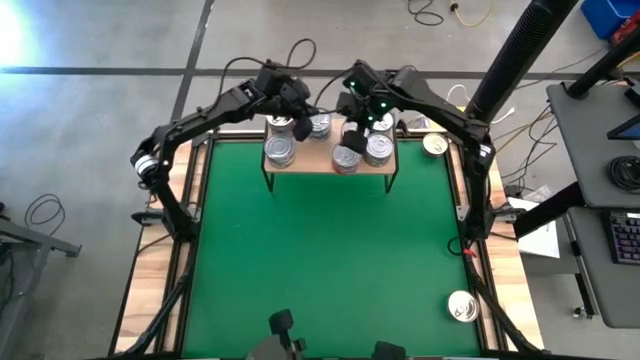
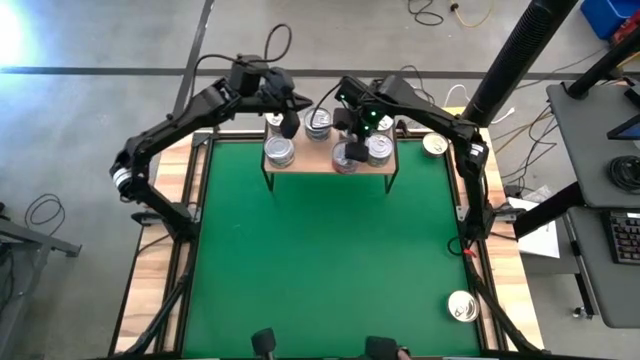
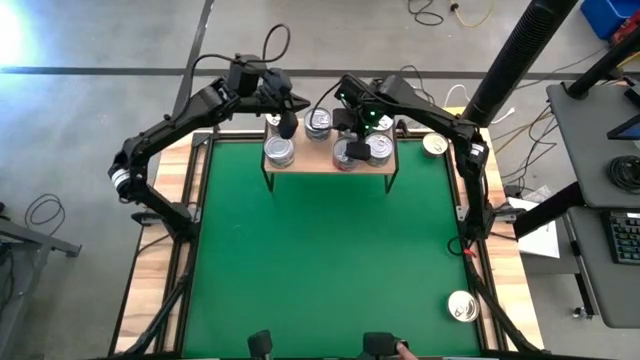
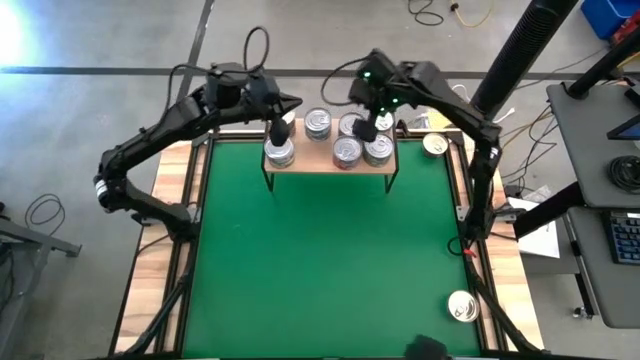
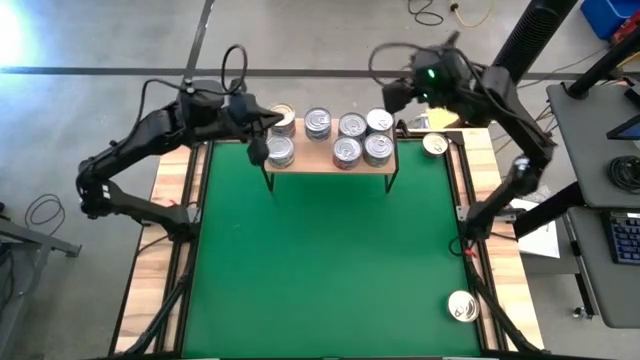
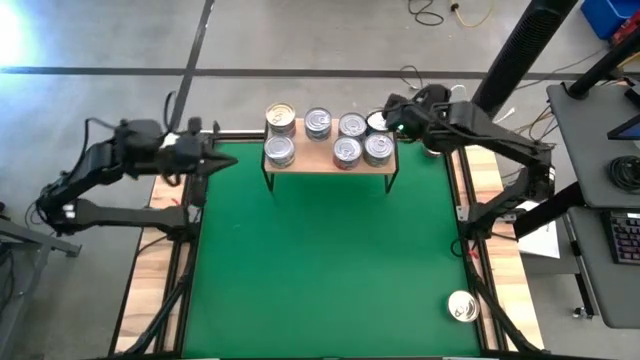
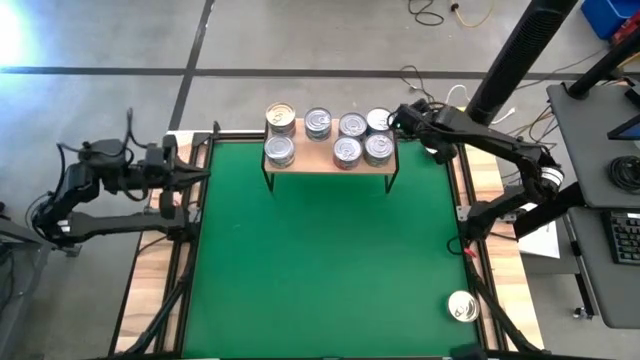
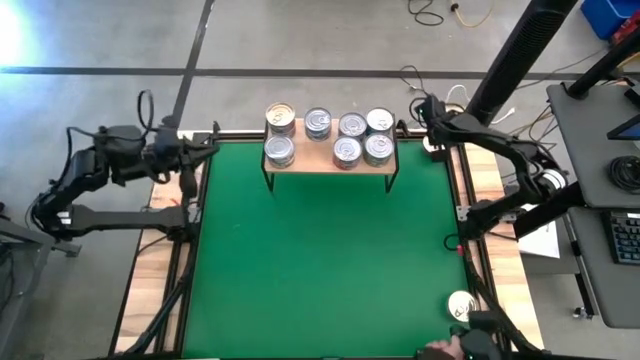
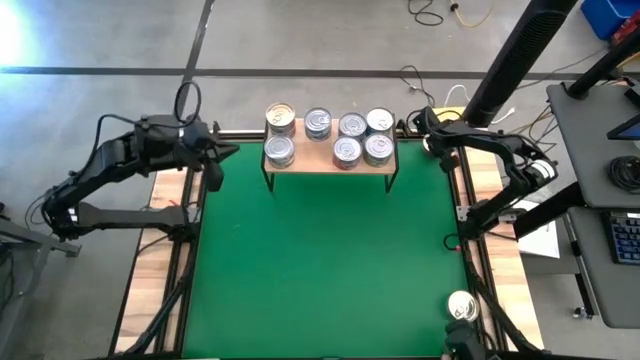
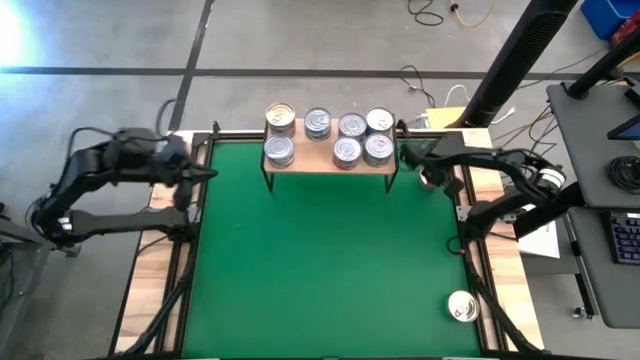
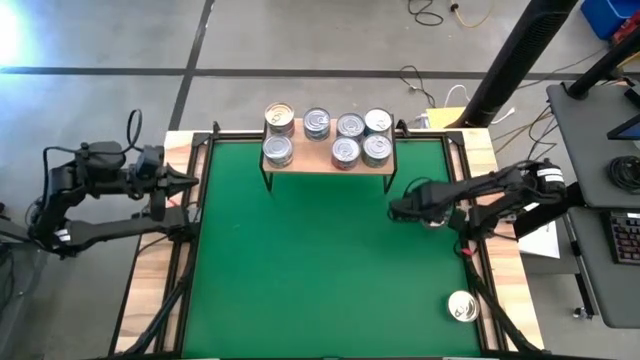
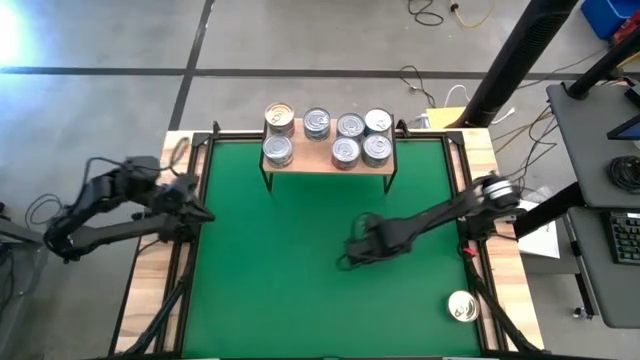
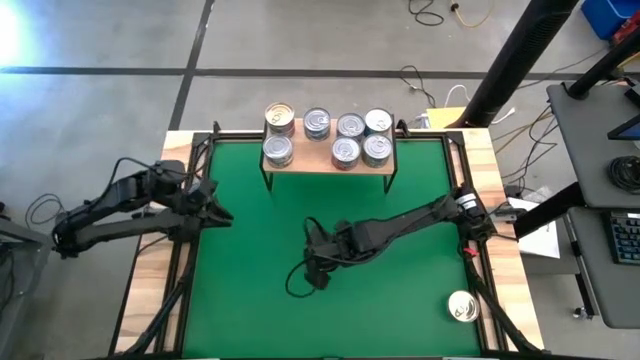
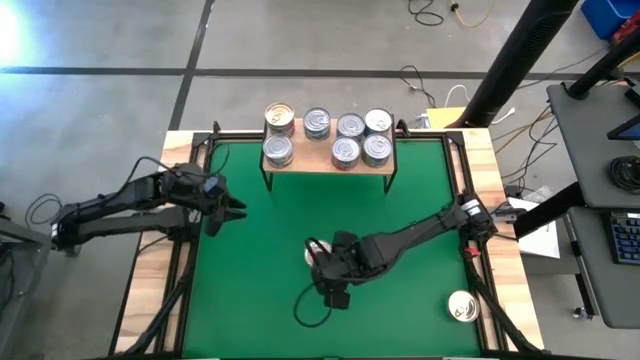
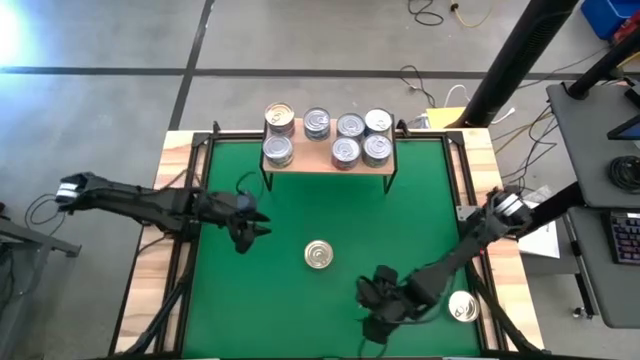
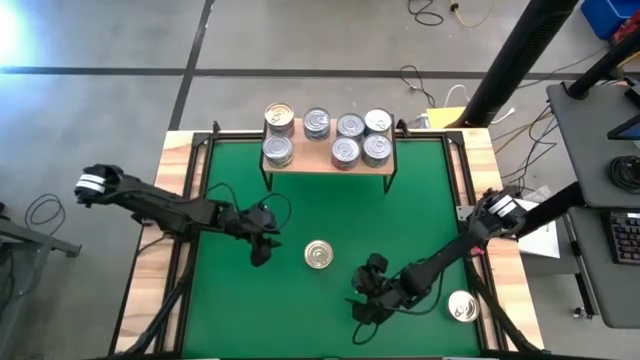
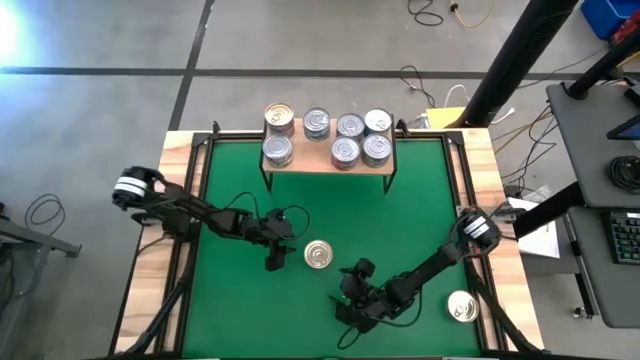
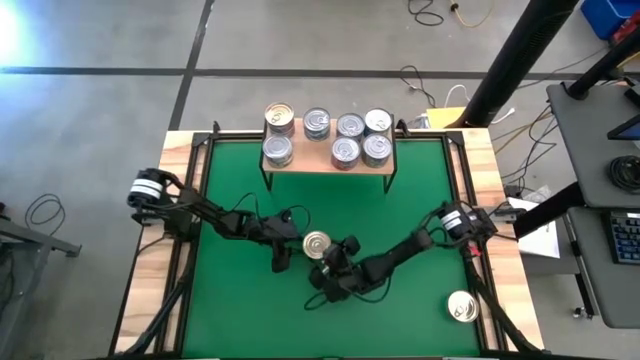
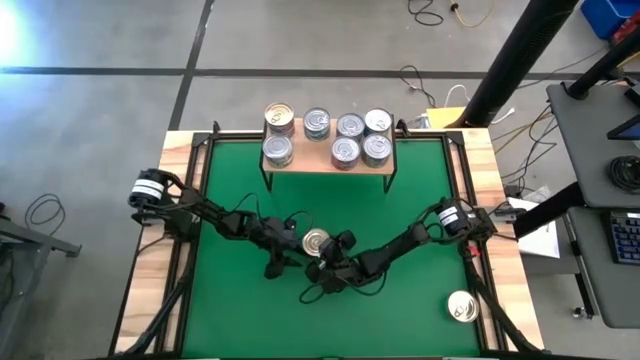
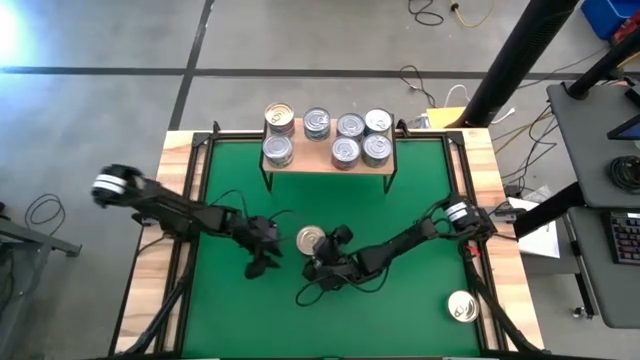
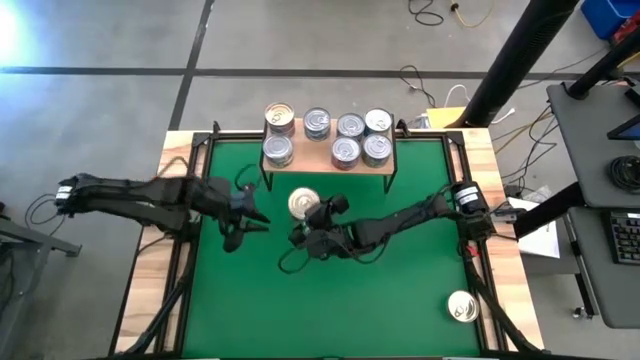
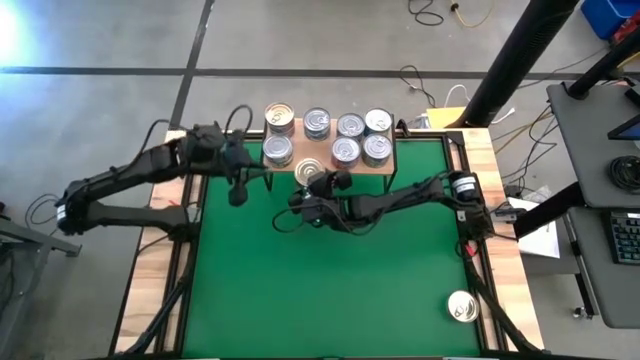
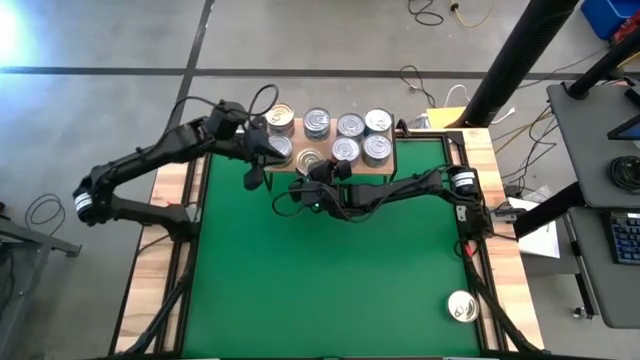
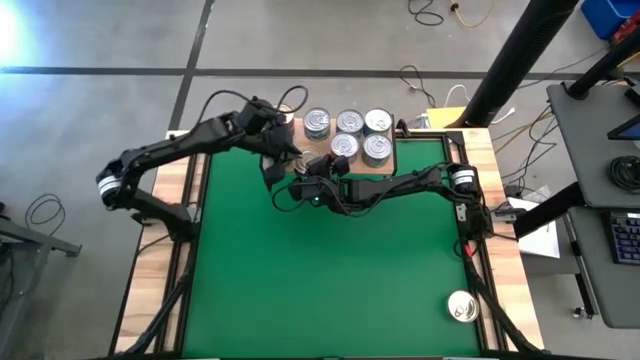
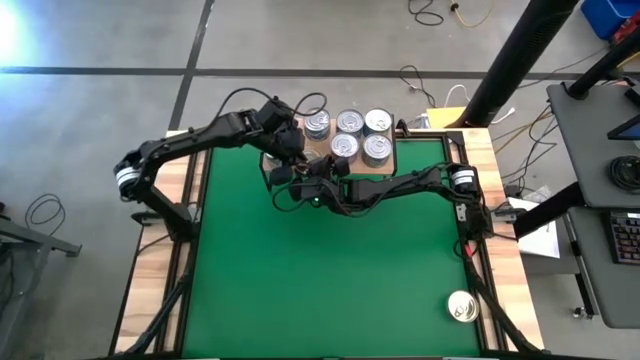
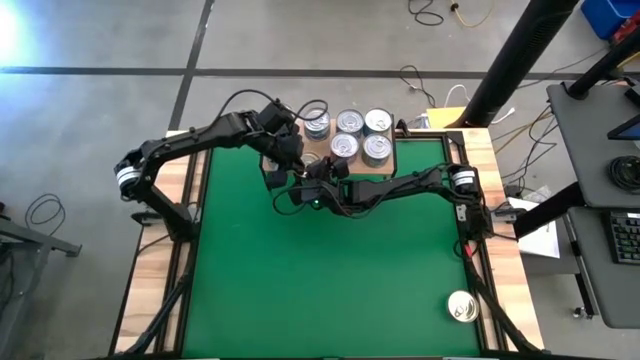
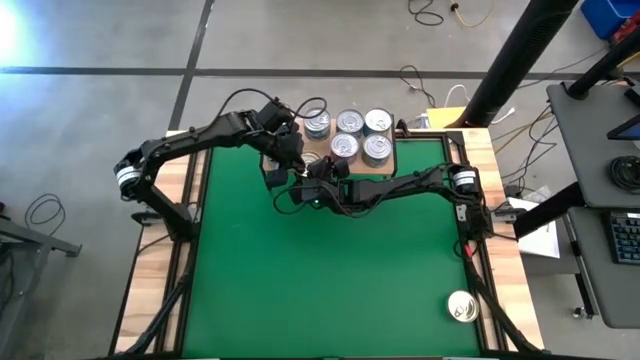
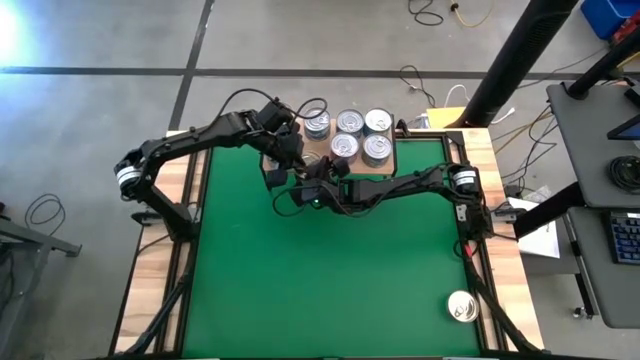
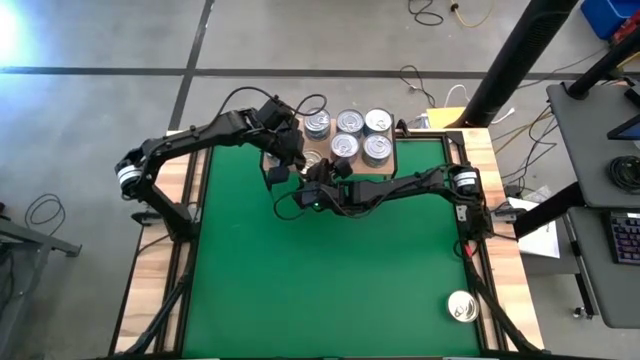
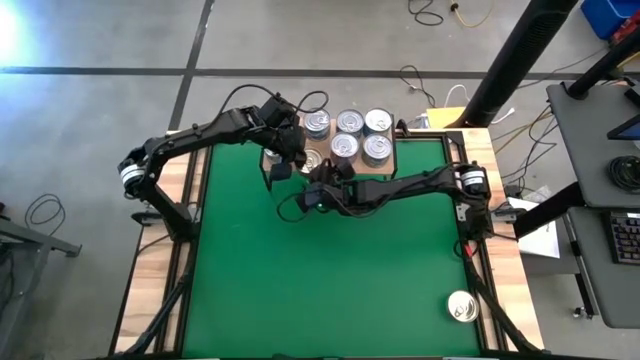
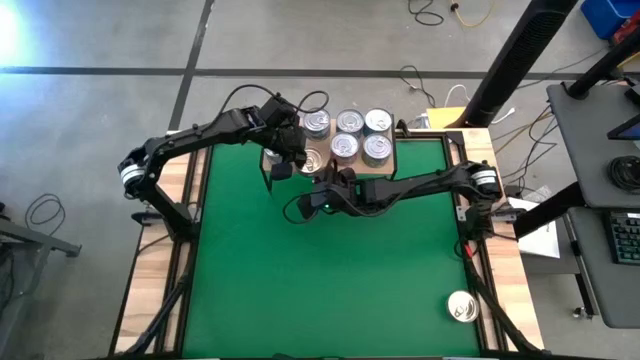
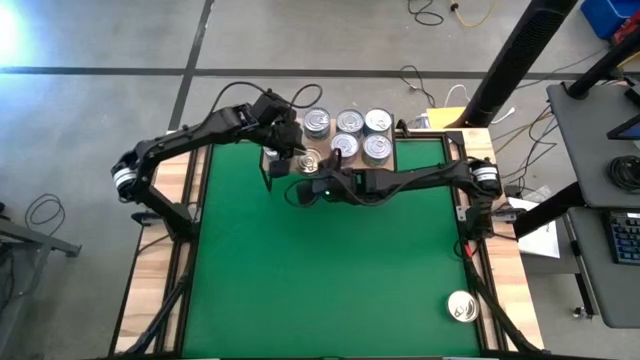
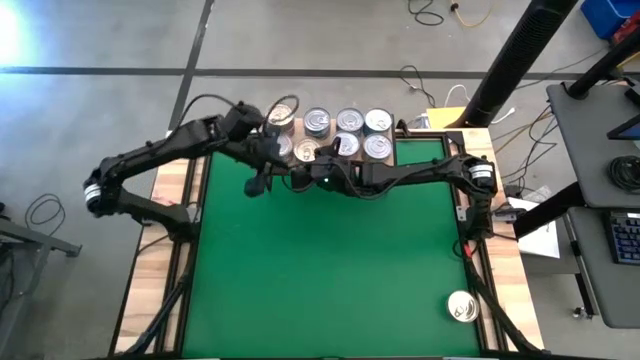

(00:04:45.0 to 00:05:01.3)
Task: Stack canned seafood by type on shelf
Put the blue pink tuna can on the shelf

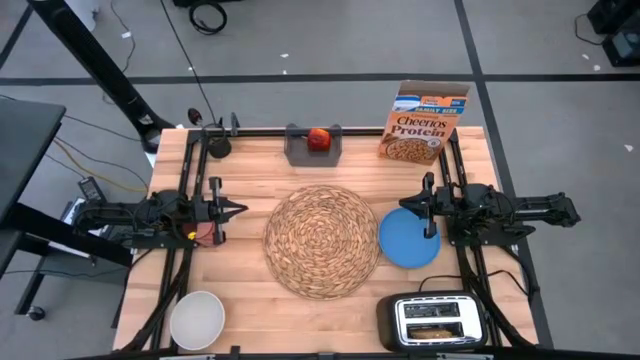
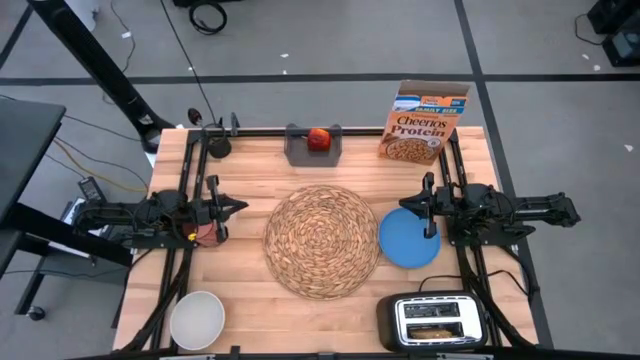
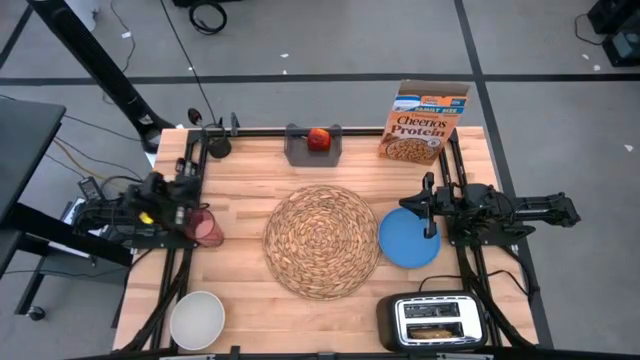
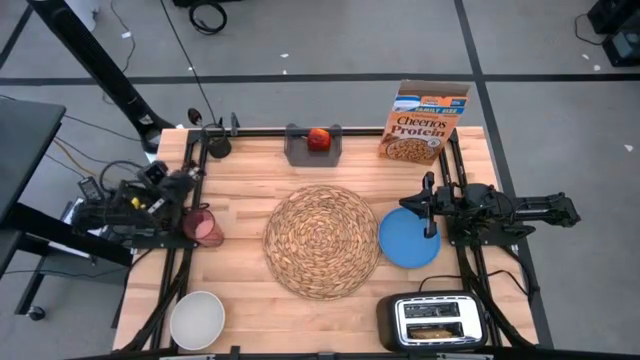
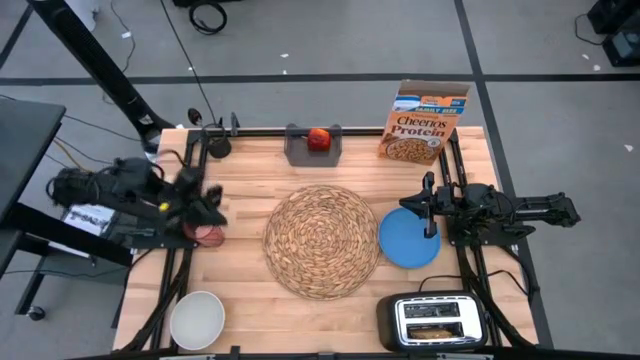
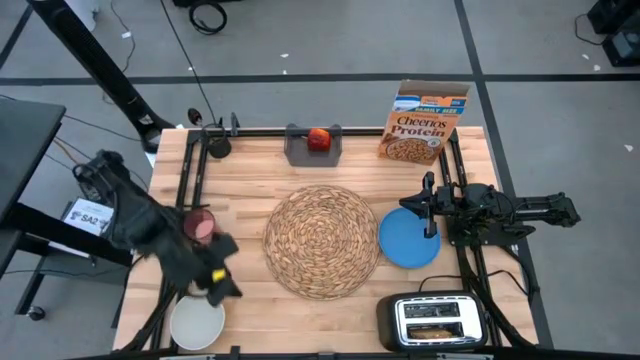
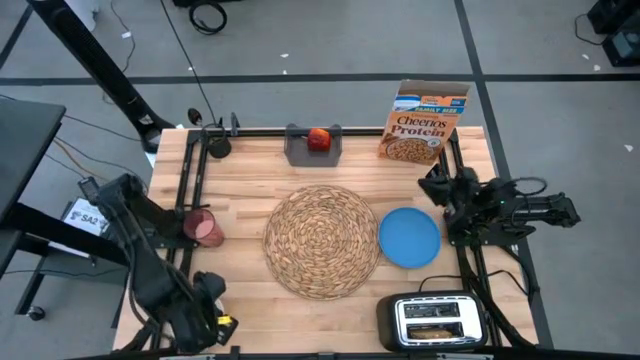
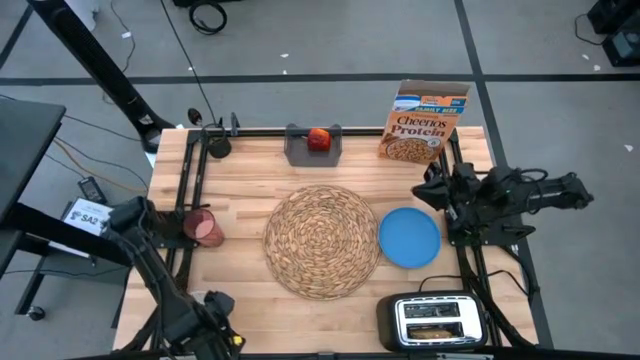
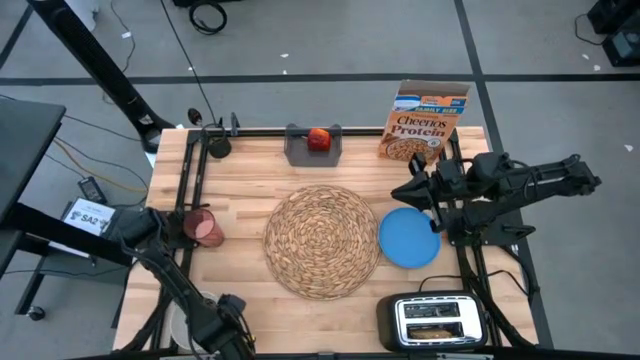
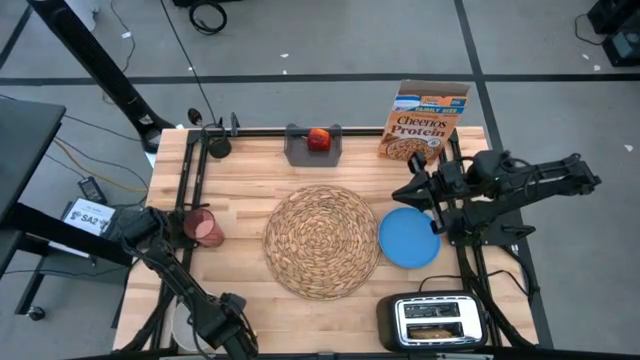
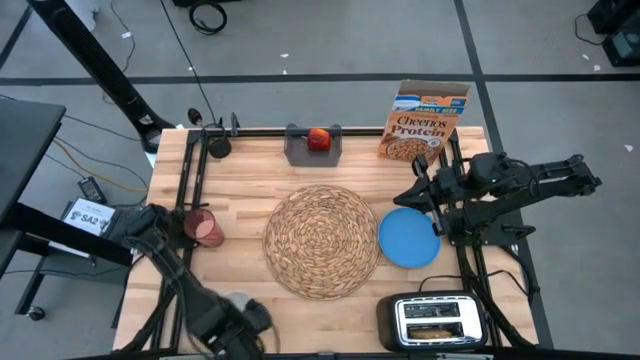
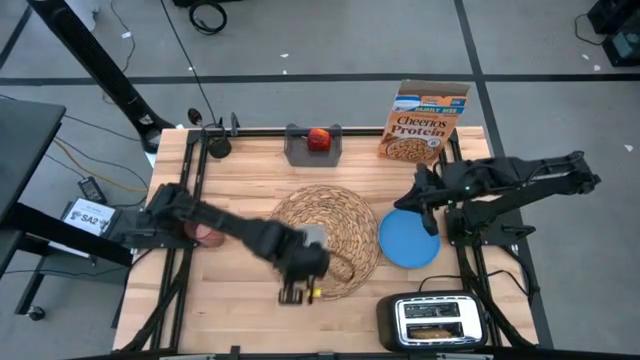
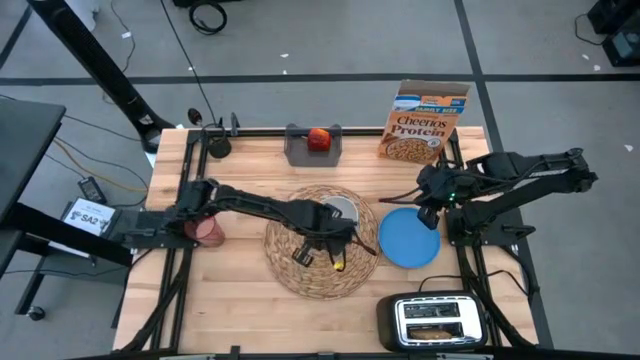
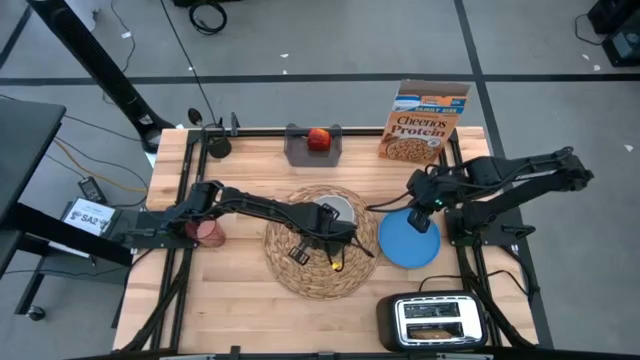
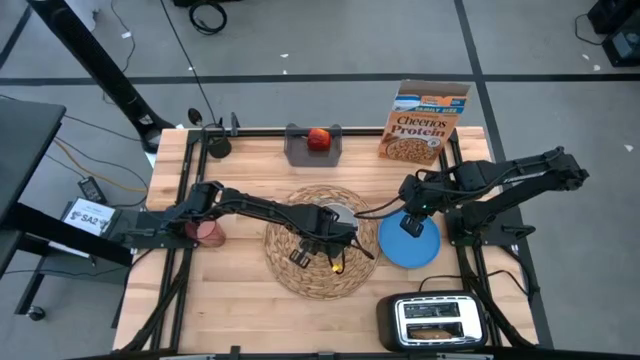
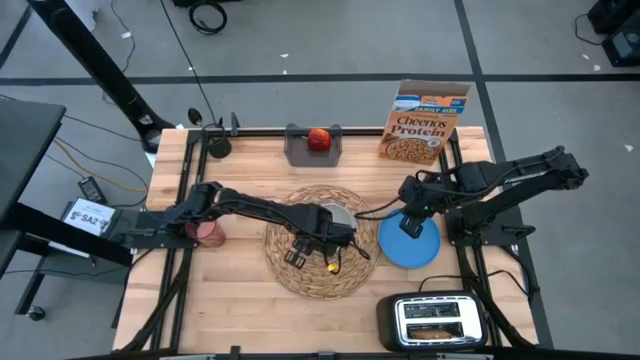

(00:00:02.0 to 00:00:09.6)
Task: Arrange a breakfast setting
Put the white bowl on the brown tablemat
